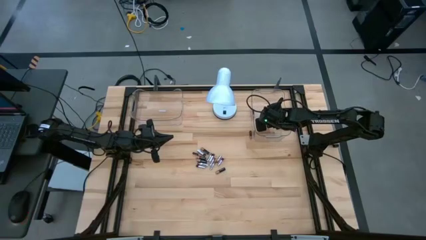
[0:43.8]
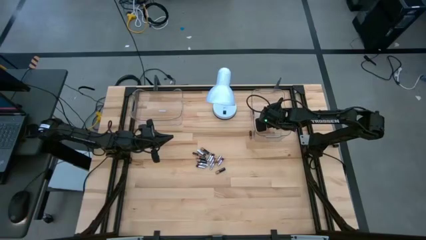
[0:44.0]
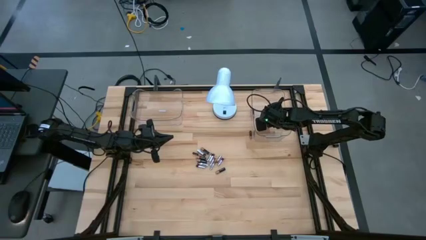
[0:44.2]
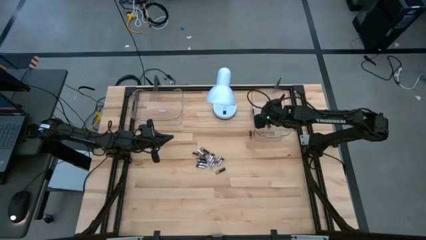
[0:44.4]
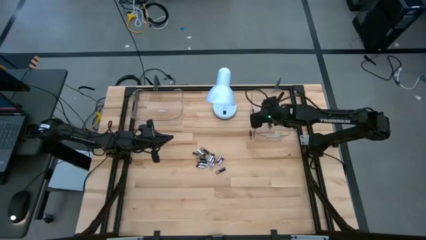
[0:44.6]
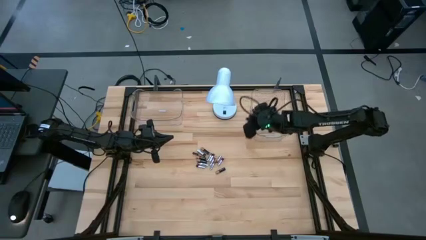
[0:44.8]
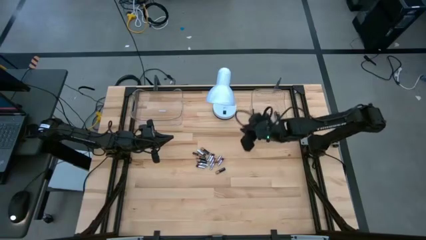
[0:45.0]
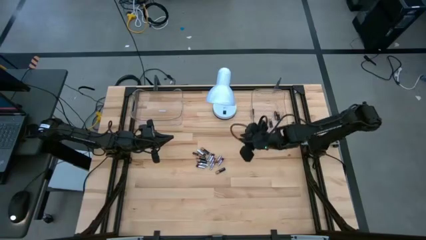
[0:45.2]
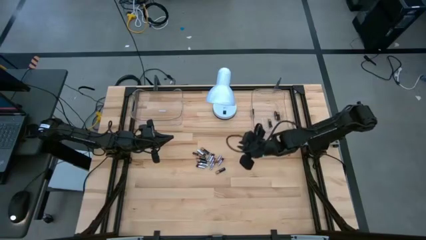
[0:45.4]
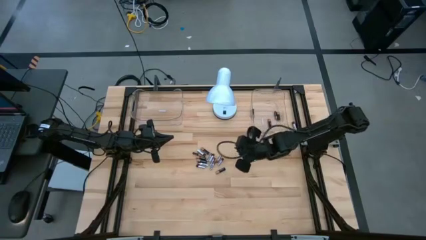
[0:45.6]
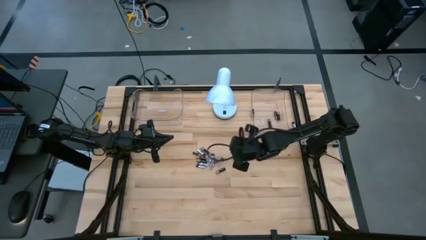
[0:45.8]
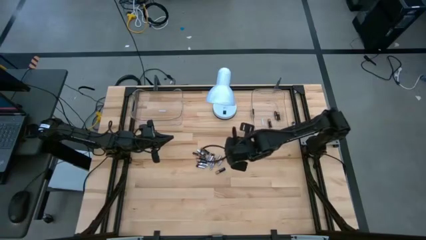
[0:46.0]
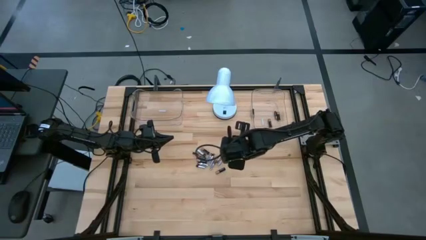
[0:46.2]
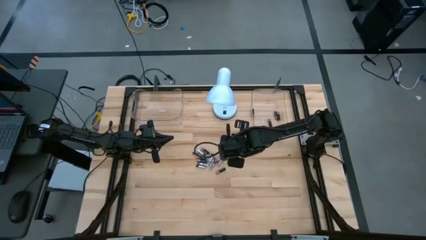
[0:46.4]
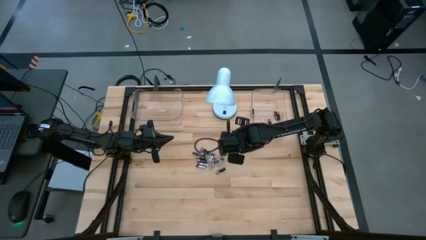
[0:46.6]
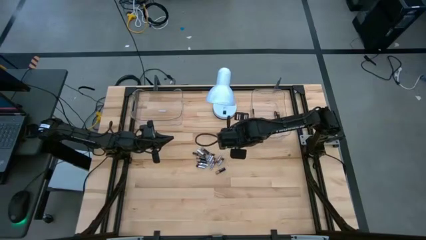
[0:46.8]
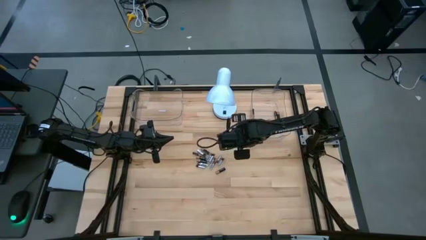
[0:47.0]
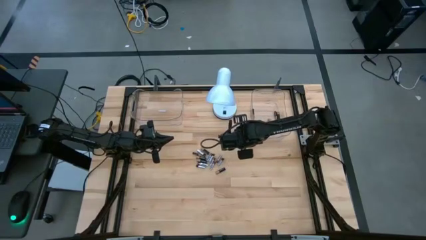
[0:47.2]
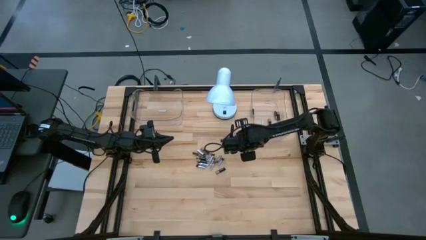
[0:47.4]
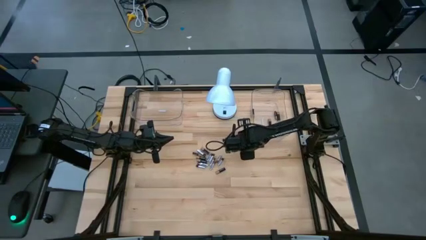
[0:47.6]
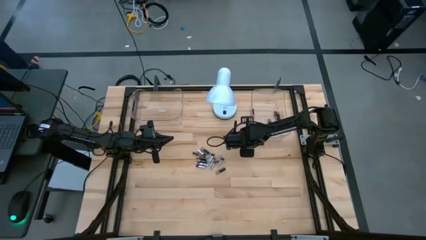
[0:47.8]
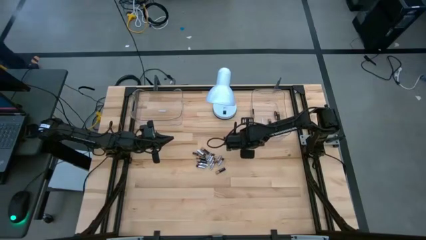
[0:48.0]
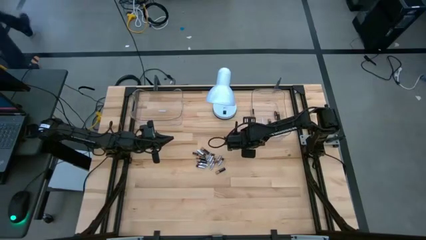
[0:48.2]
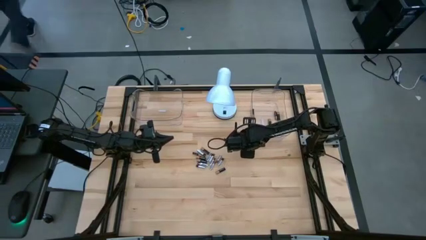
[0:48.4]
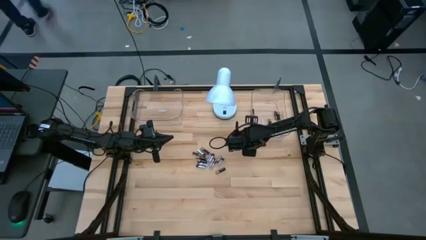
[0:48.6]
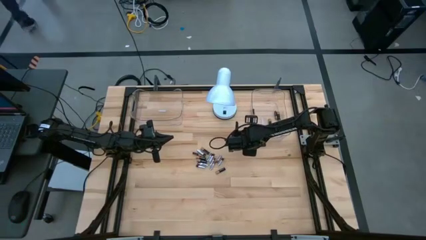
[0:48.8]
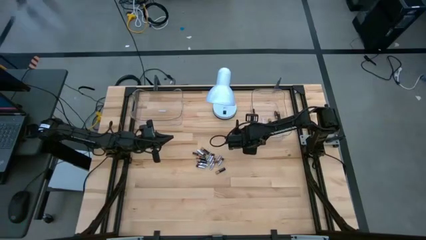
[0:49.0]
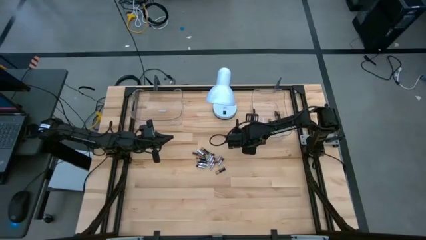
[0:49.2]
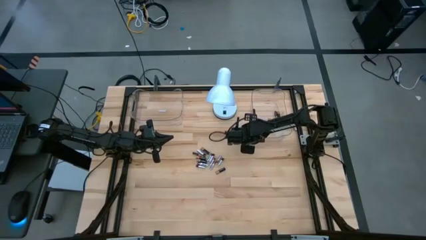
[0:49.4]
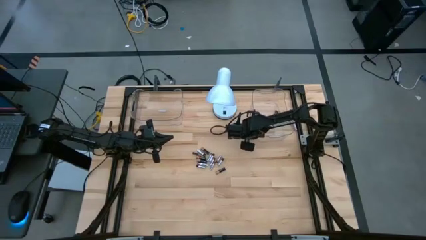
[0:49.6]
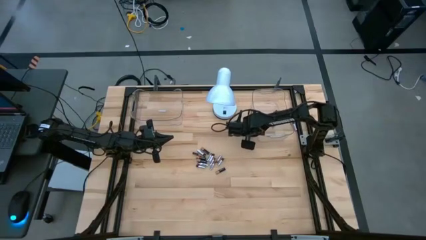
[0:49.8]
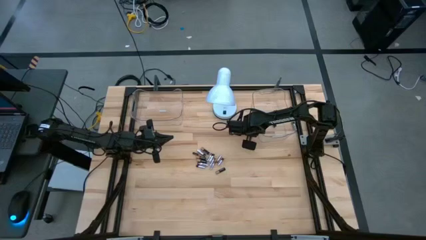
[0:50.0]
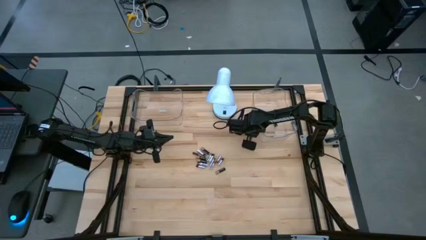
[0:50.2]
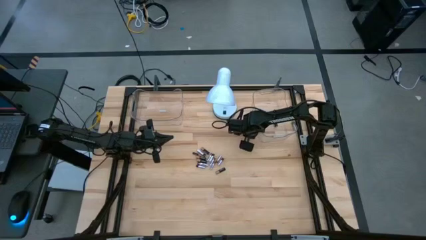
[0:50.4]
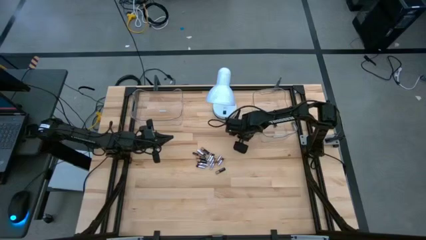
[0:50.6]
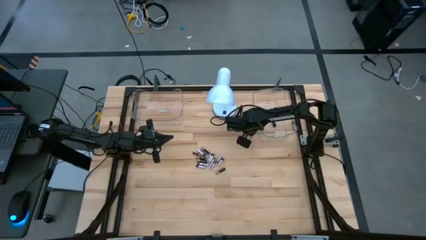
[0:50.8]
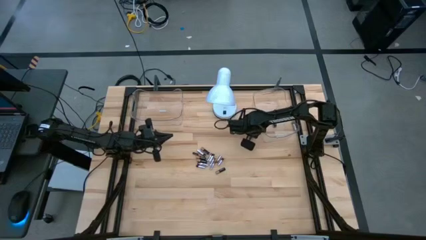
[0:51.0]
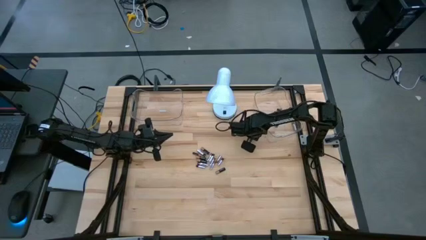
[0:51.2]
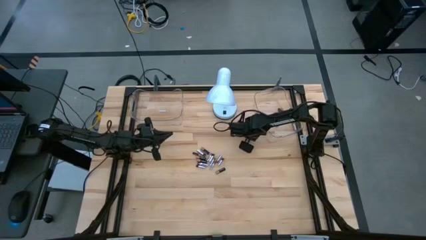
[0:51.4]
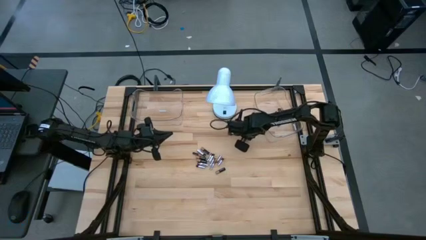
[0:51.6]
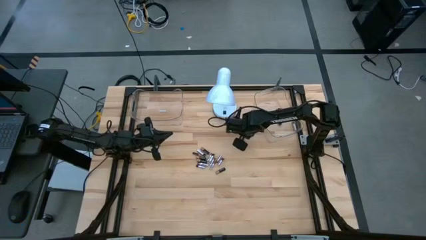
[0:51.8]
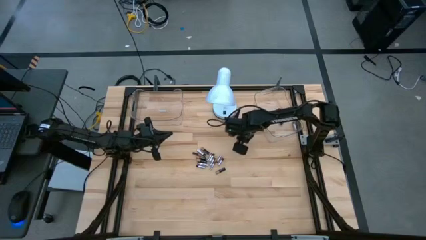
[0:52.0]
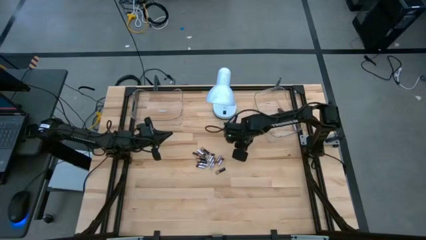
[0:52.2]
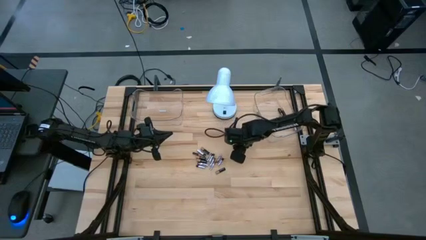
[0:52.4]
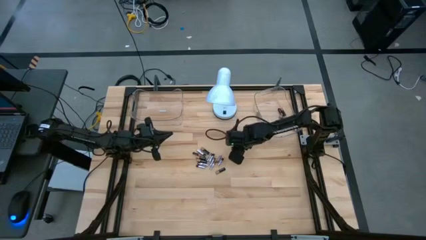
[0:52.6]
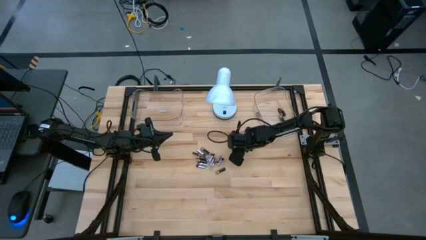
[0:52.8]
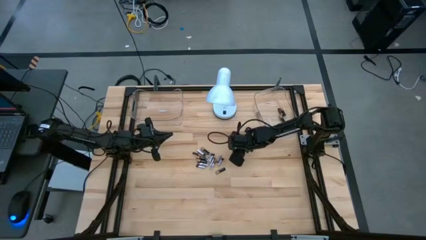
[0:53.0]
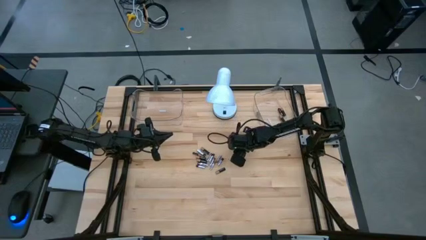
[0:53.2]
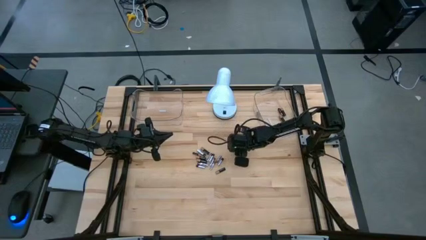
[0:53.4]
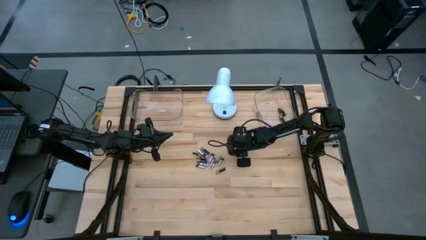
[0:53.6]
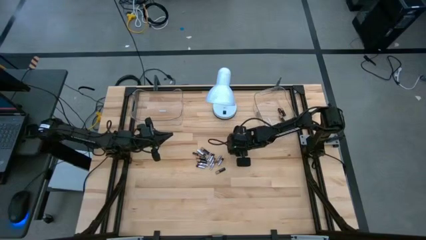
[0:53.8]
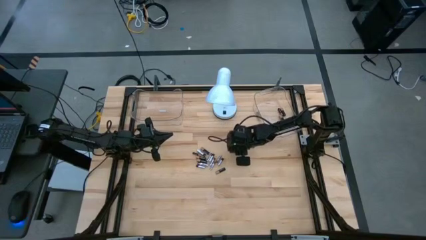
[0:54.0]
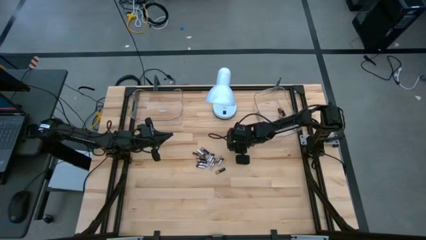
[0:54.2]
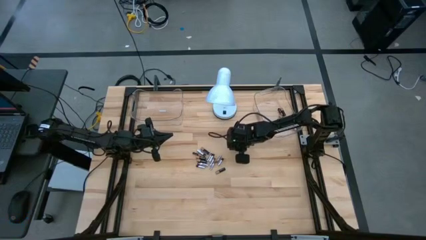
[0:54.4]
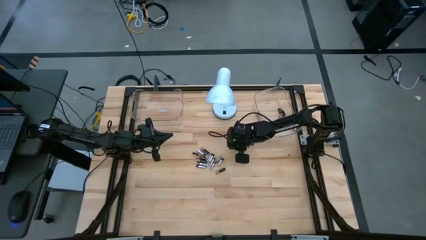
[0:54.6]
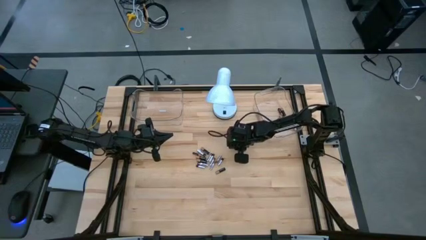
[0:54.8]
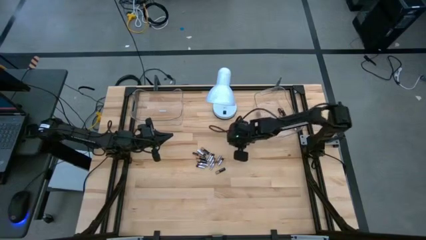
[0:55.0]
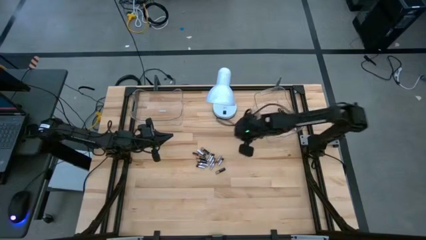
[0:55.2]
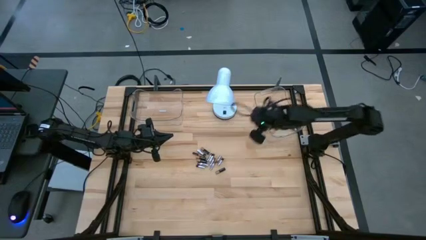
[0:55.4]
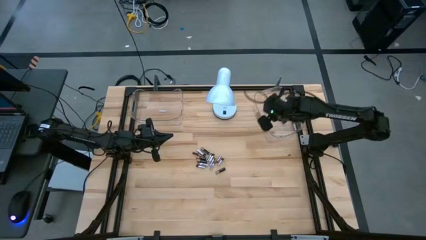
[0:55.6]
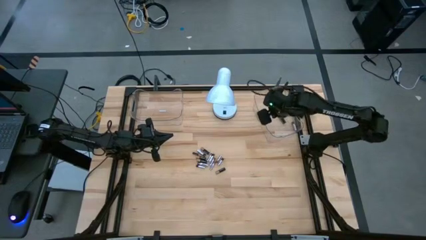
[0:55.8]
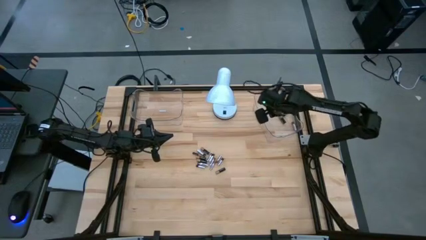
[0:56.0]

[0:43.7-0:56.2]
Task: Sort batteries
Put the black battery in the transparent bin
